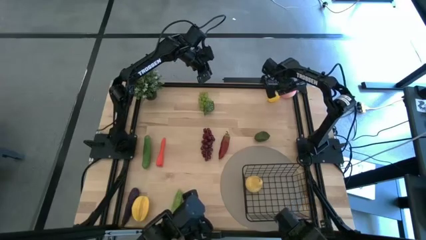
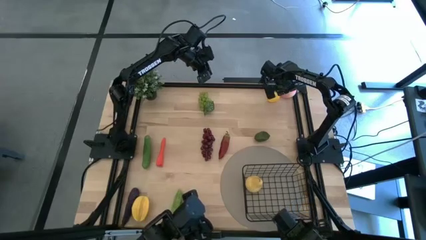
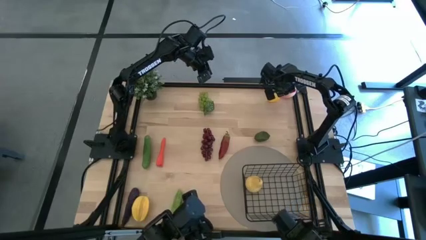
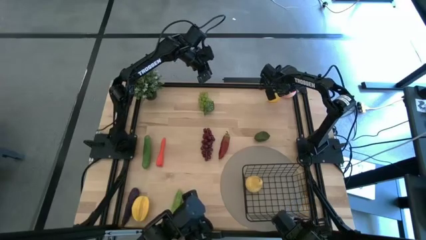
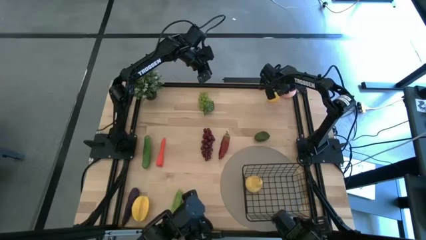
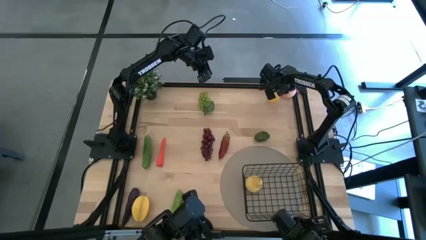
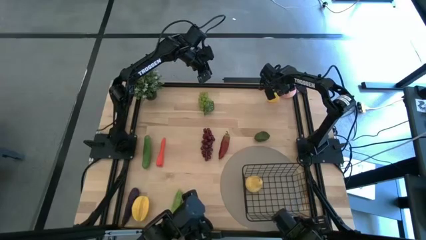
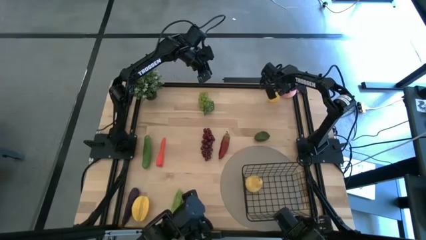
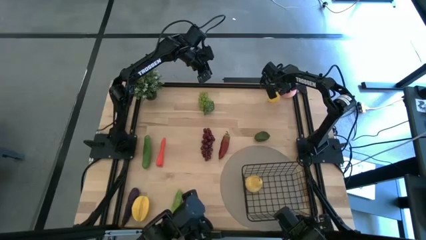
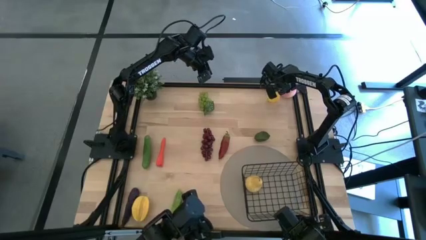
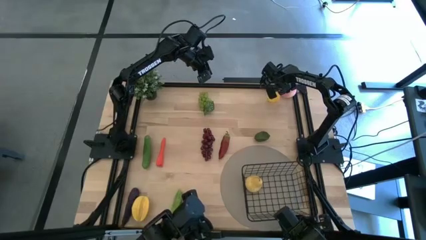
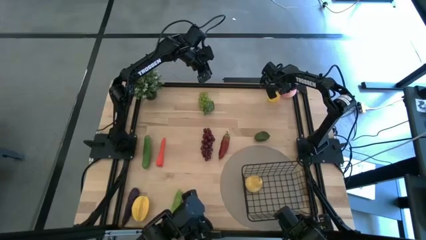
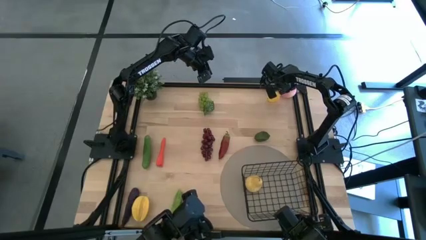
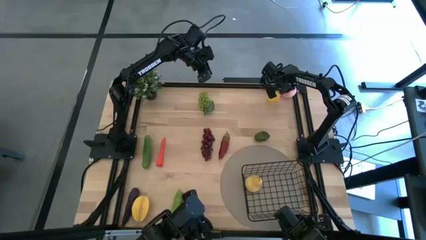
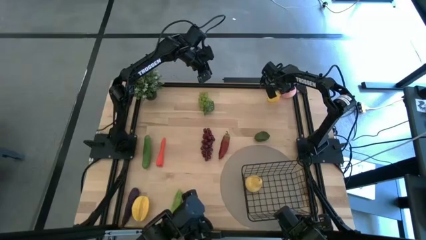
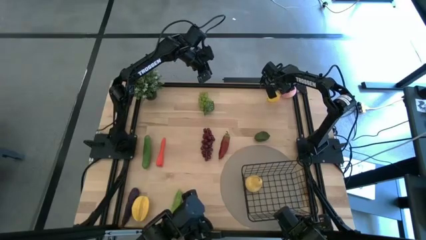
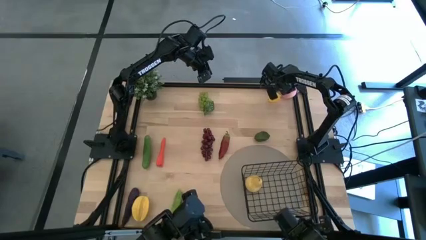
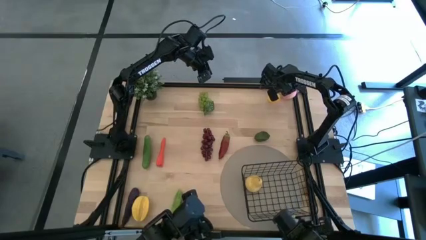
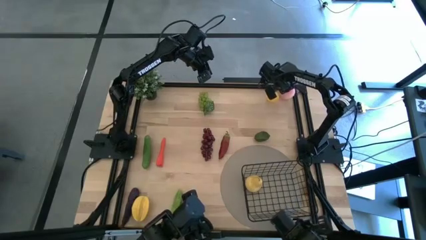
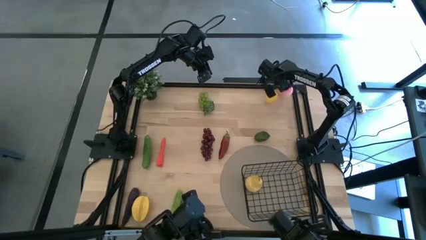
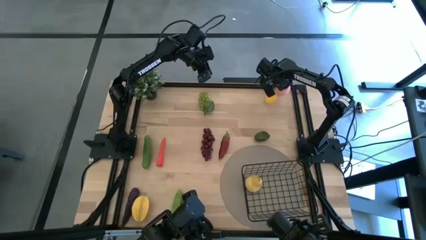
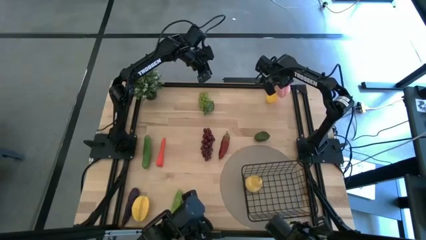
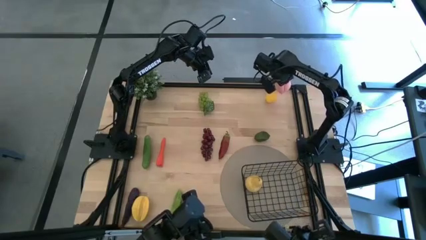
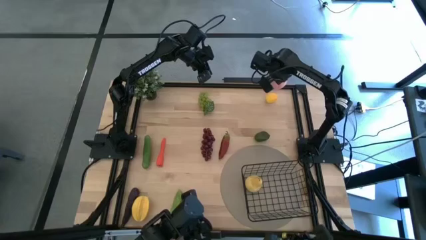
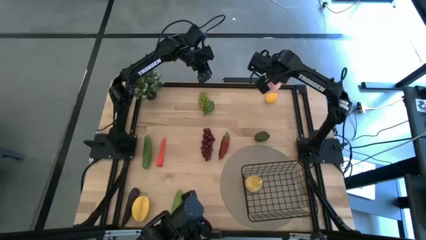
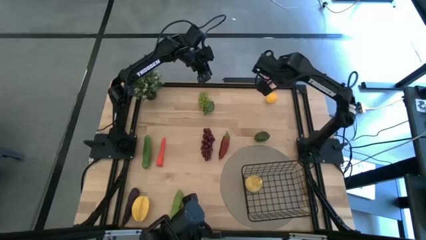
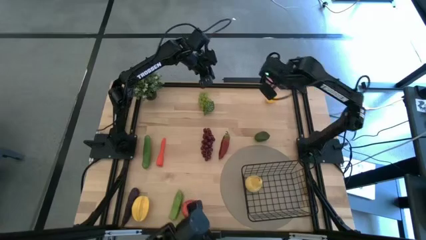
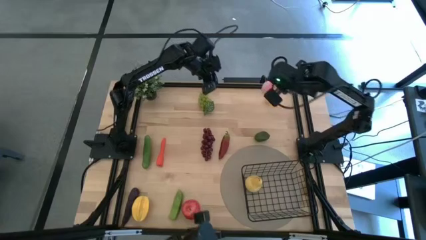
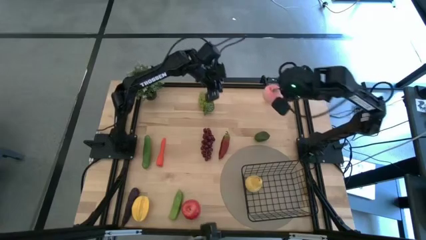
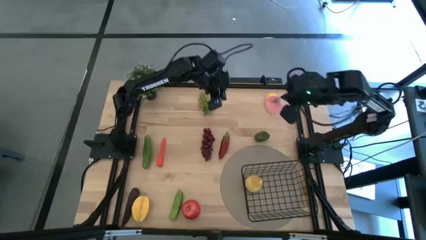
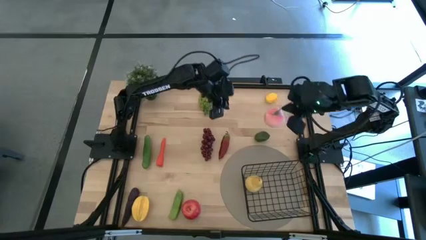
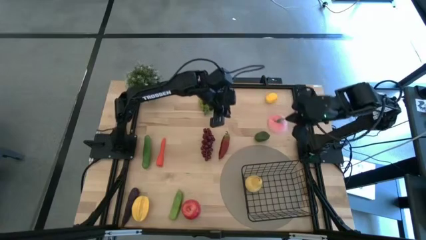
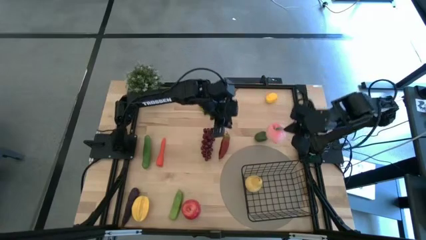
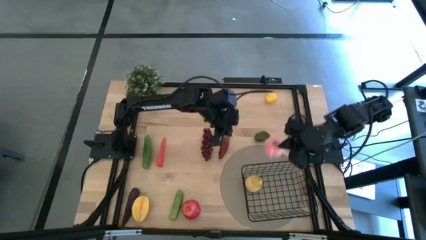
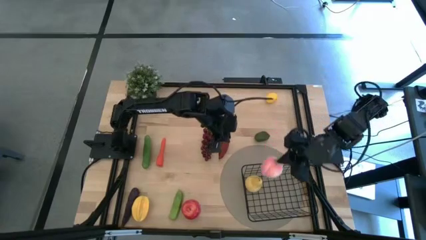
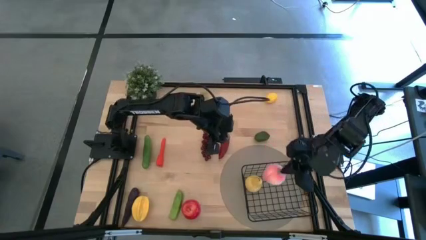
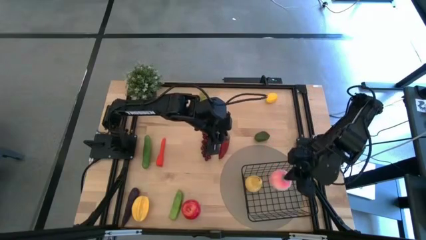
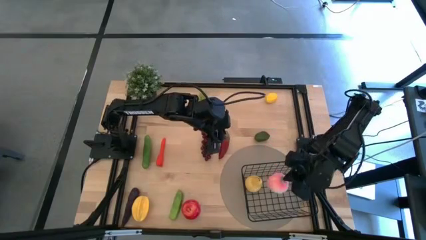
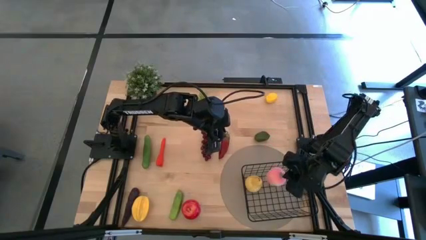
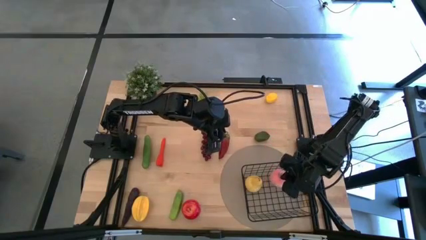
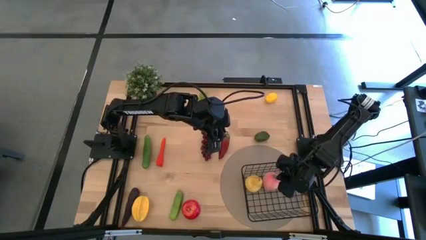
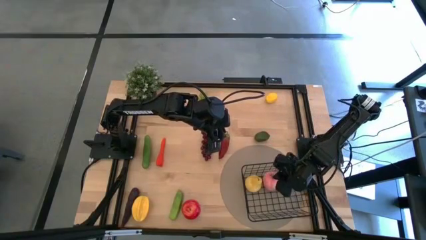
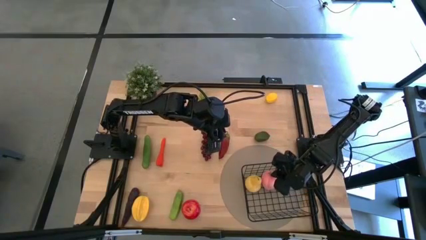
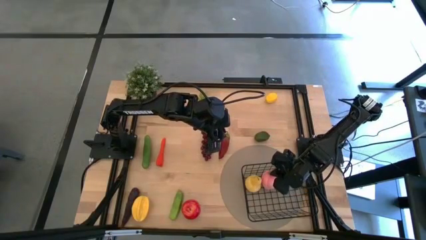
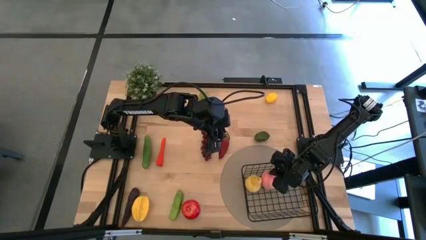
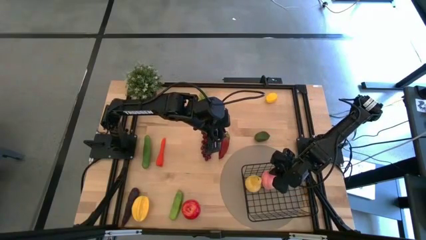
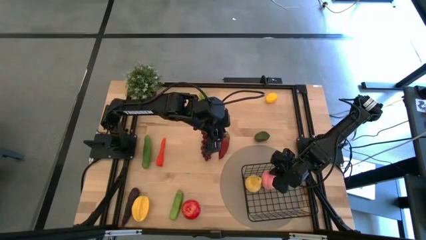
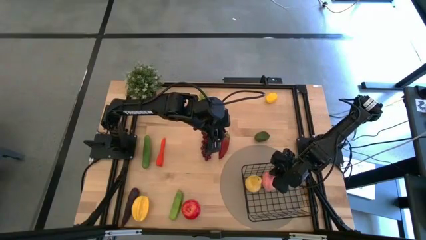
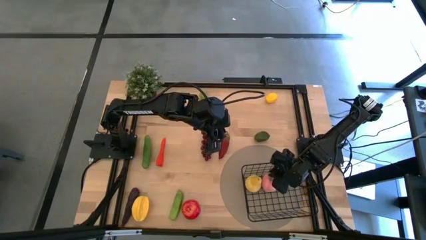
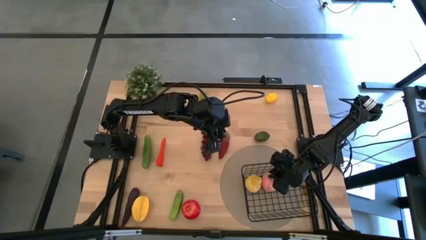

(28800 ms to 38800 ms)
Task: Build produce basket
Put the peach into the wire basket
